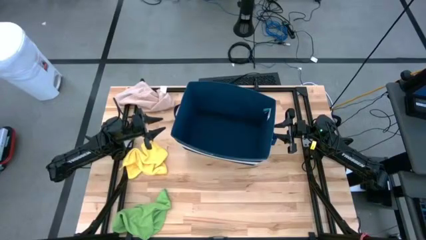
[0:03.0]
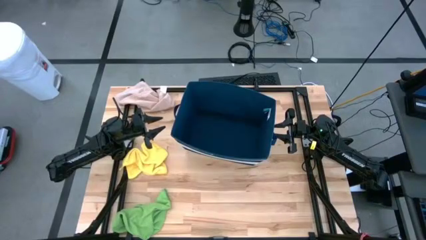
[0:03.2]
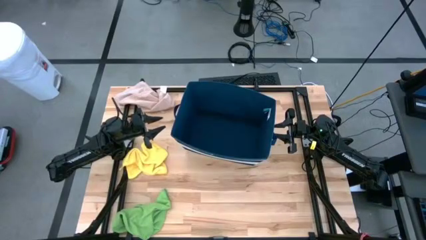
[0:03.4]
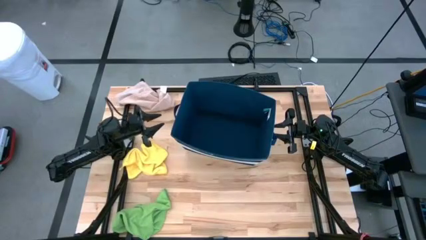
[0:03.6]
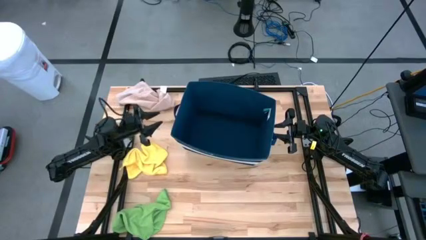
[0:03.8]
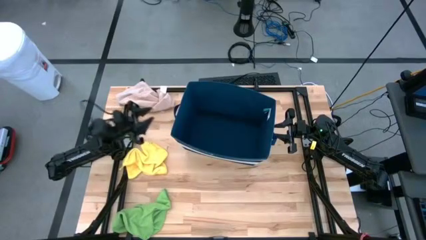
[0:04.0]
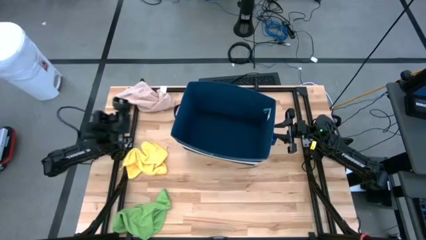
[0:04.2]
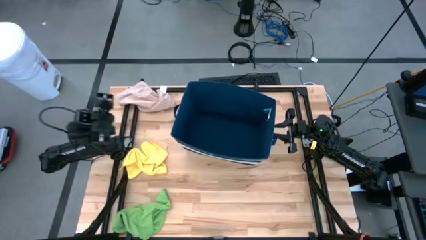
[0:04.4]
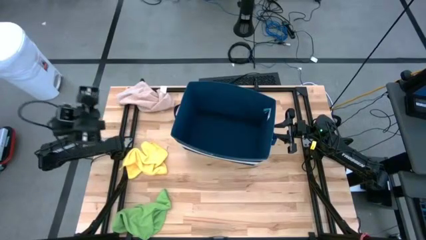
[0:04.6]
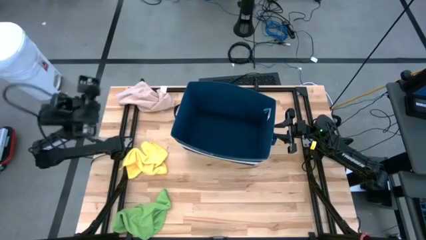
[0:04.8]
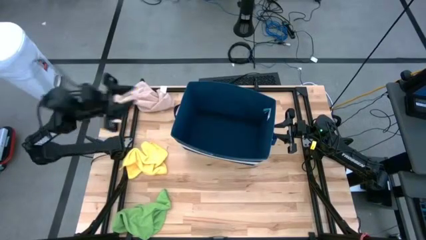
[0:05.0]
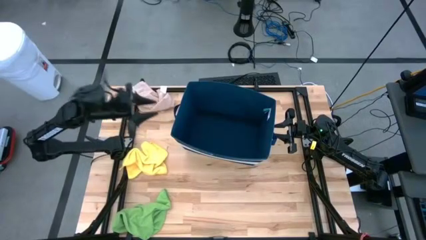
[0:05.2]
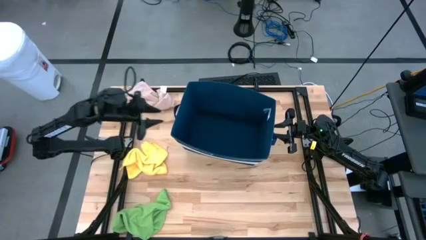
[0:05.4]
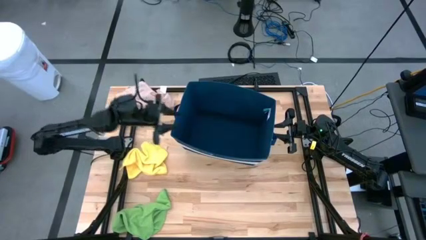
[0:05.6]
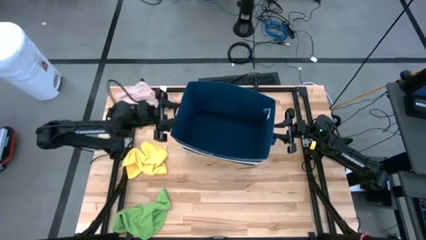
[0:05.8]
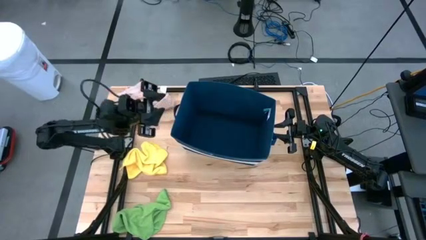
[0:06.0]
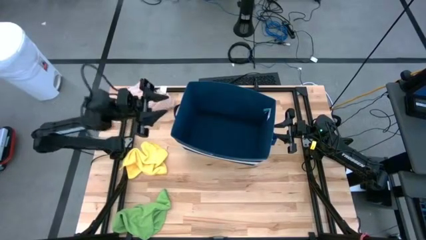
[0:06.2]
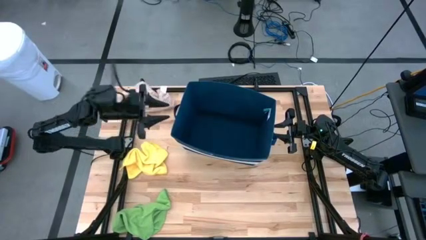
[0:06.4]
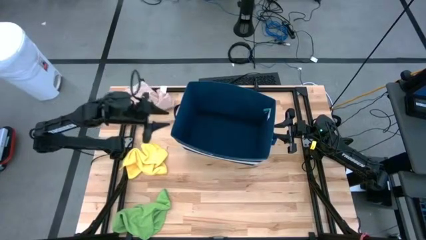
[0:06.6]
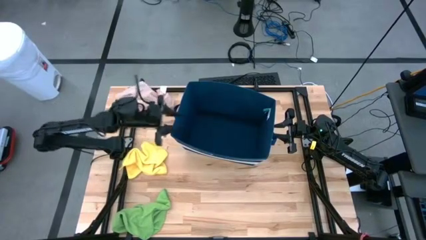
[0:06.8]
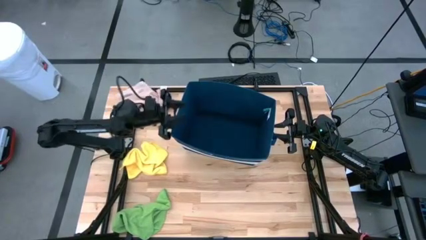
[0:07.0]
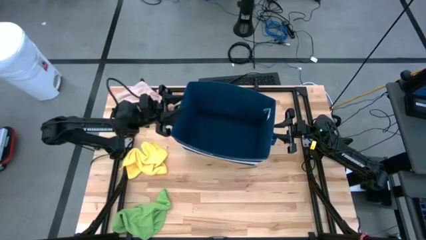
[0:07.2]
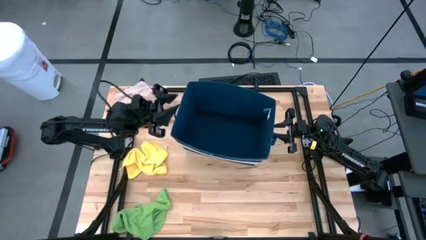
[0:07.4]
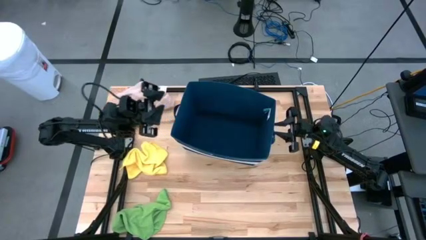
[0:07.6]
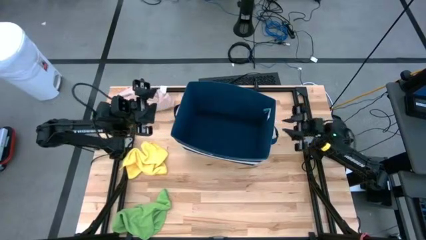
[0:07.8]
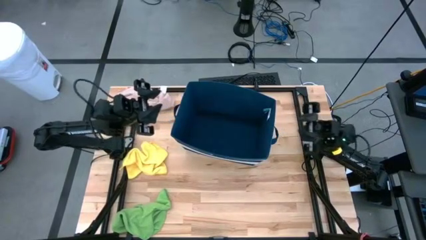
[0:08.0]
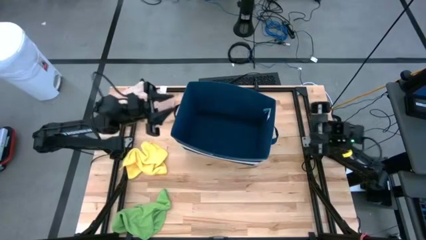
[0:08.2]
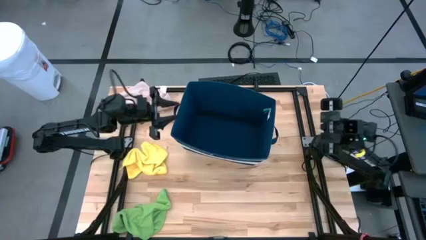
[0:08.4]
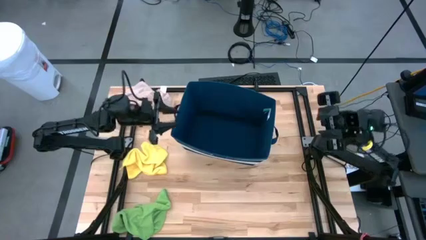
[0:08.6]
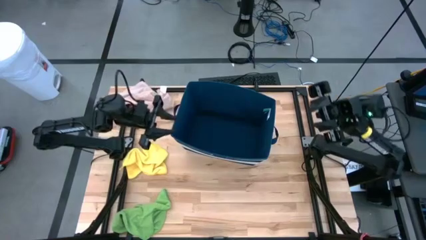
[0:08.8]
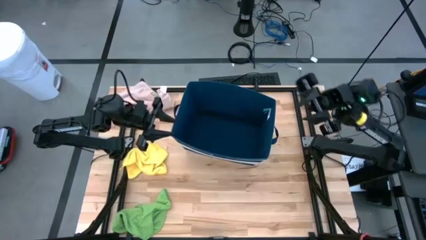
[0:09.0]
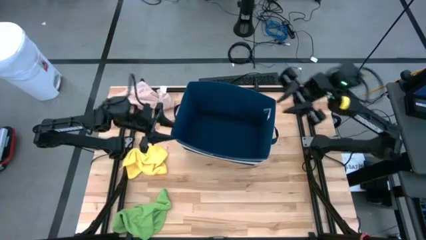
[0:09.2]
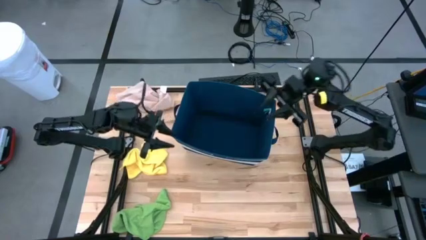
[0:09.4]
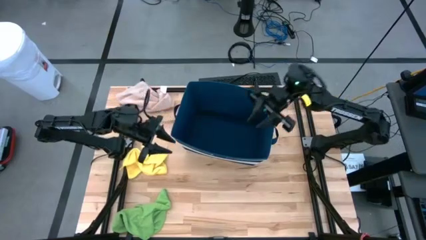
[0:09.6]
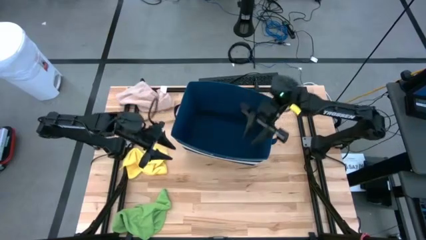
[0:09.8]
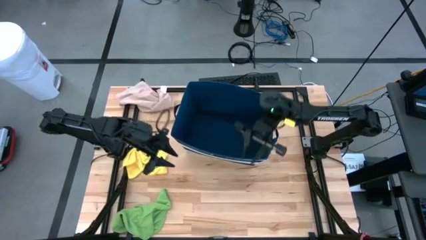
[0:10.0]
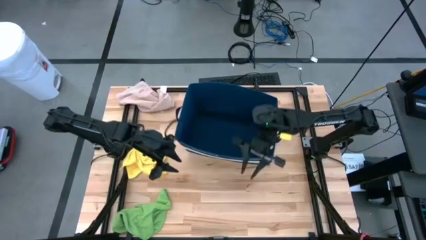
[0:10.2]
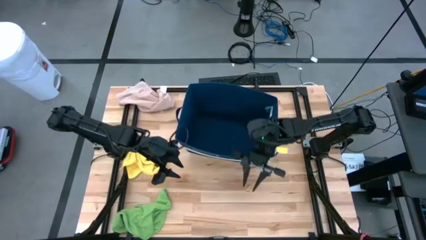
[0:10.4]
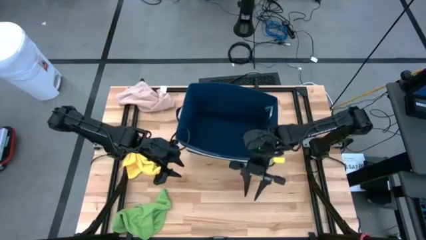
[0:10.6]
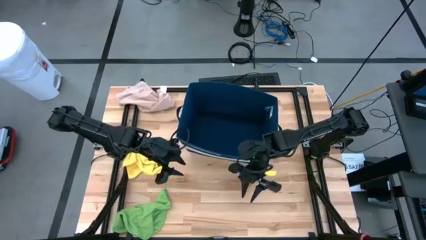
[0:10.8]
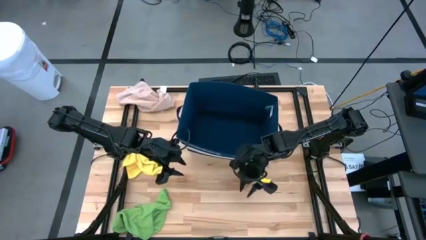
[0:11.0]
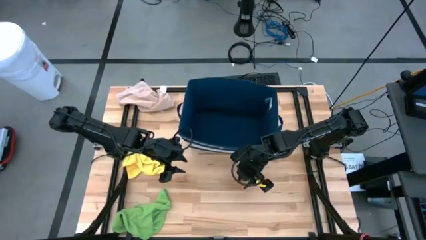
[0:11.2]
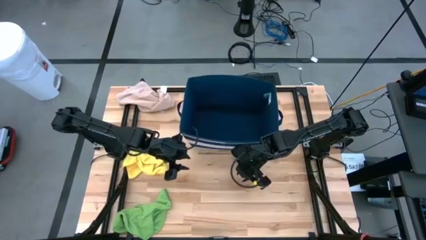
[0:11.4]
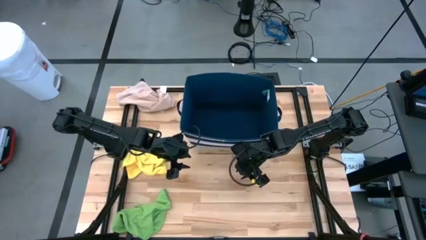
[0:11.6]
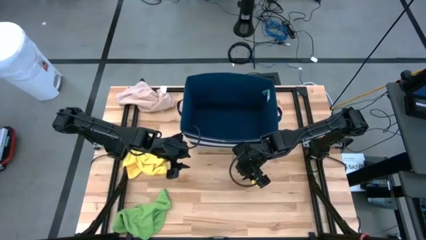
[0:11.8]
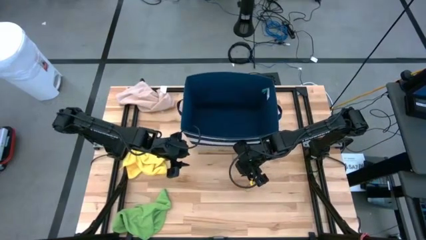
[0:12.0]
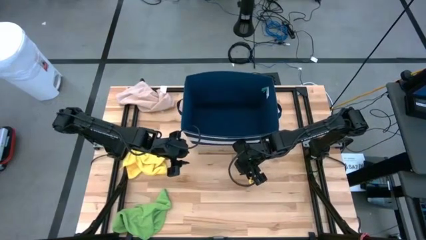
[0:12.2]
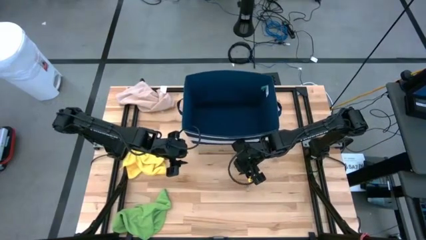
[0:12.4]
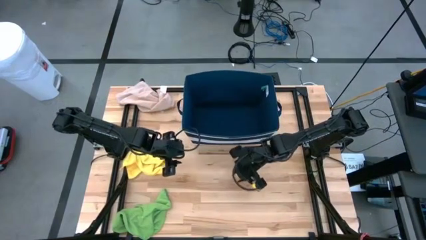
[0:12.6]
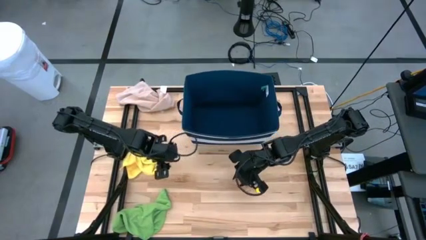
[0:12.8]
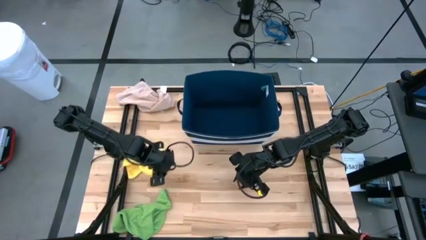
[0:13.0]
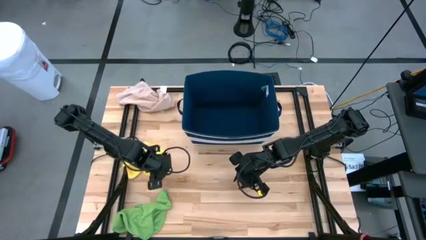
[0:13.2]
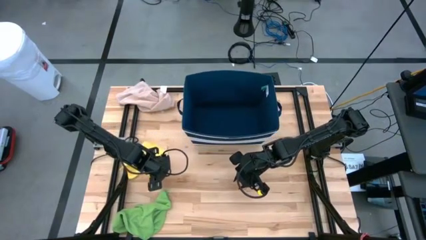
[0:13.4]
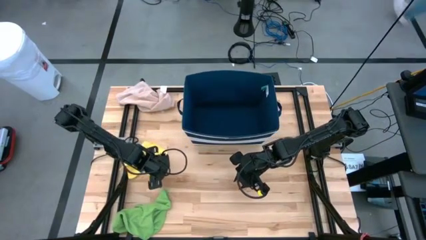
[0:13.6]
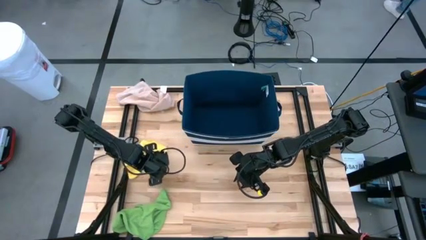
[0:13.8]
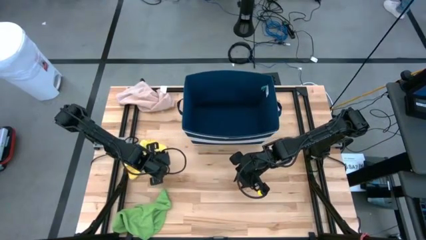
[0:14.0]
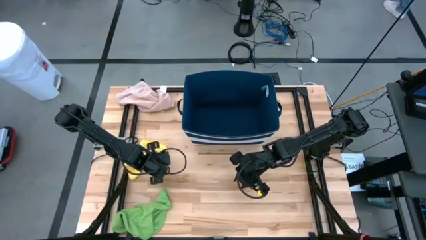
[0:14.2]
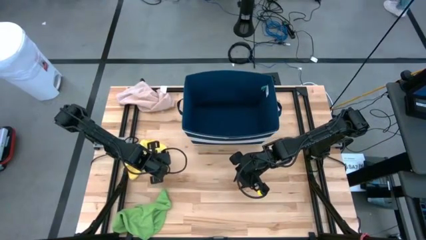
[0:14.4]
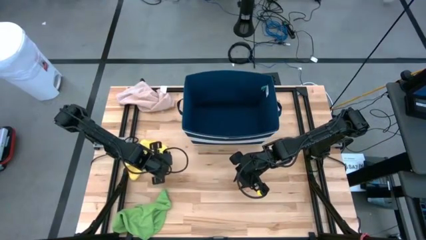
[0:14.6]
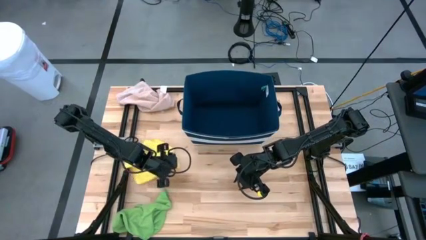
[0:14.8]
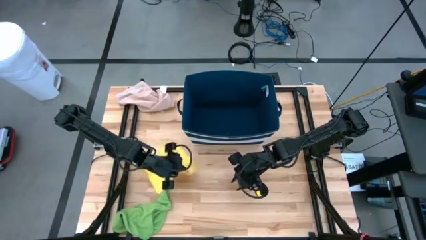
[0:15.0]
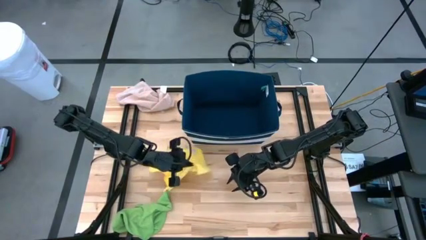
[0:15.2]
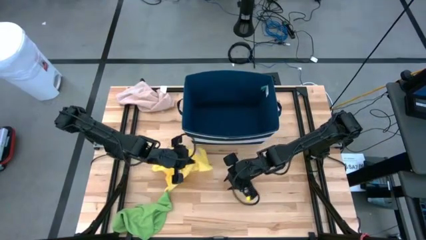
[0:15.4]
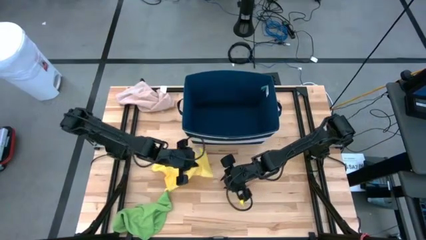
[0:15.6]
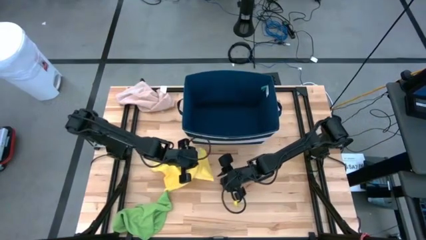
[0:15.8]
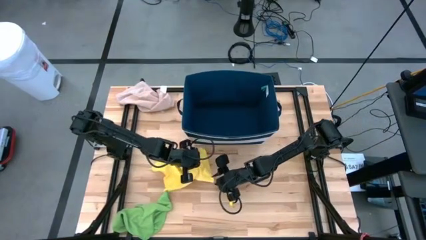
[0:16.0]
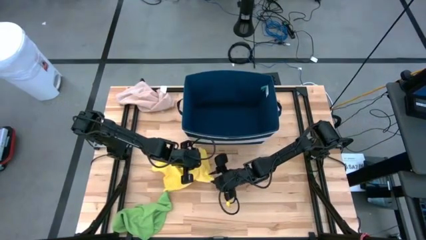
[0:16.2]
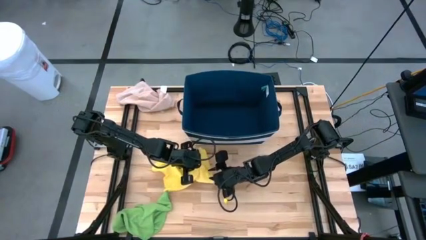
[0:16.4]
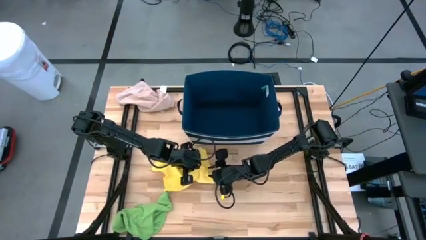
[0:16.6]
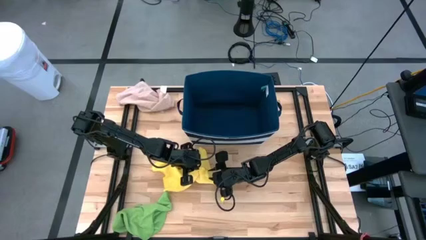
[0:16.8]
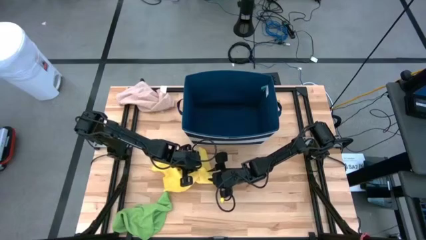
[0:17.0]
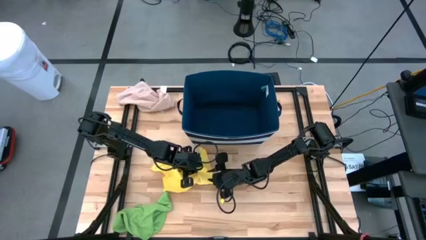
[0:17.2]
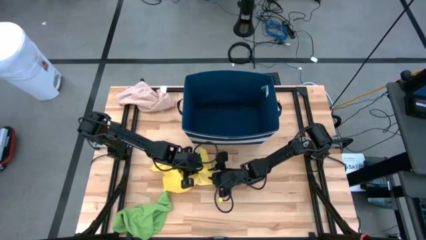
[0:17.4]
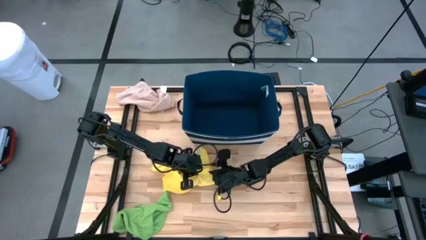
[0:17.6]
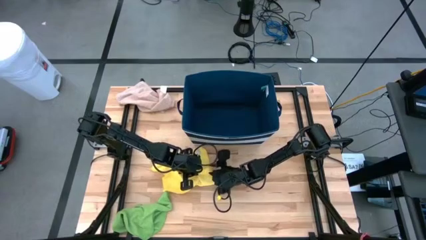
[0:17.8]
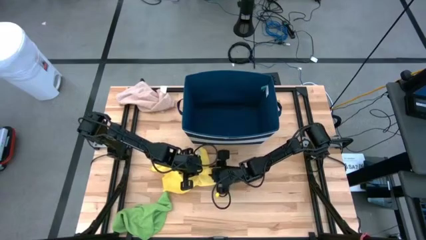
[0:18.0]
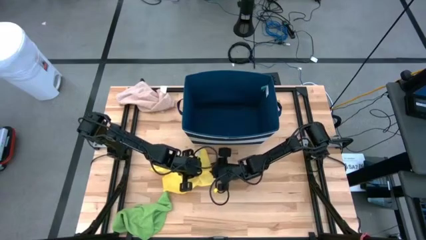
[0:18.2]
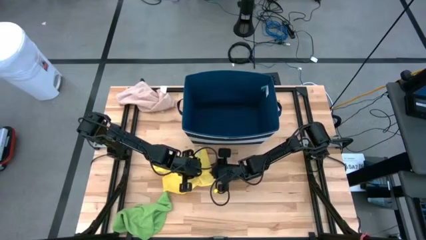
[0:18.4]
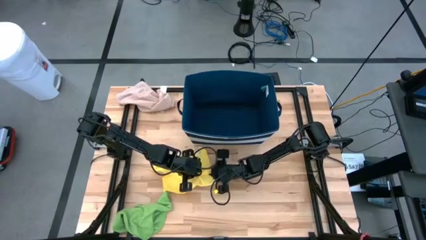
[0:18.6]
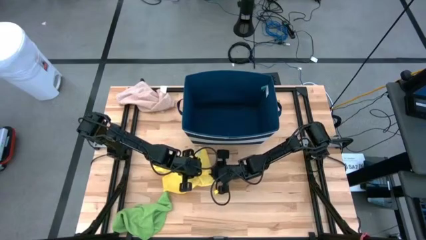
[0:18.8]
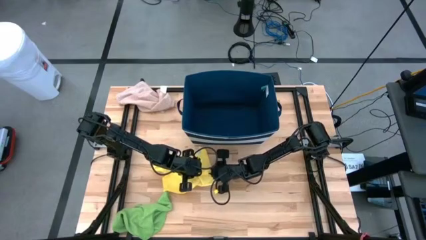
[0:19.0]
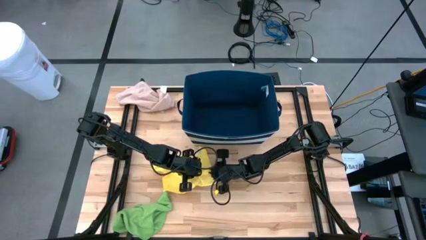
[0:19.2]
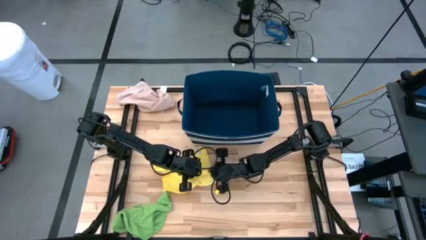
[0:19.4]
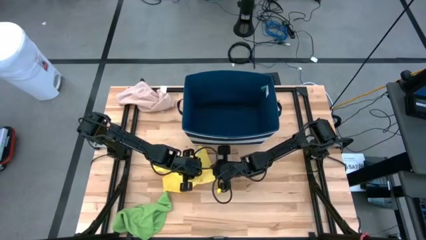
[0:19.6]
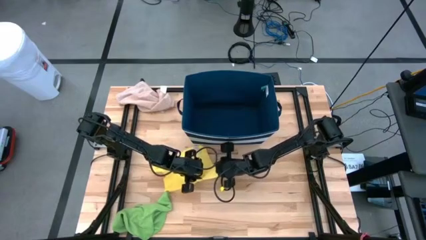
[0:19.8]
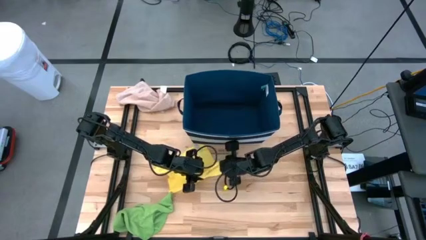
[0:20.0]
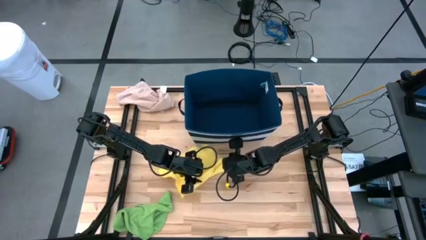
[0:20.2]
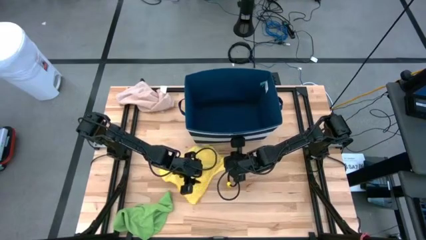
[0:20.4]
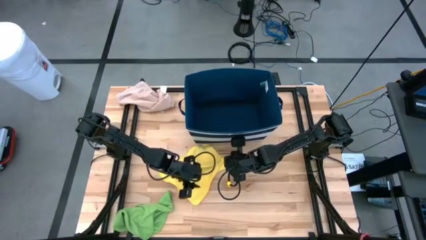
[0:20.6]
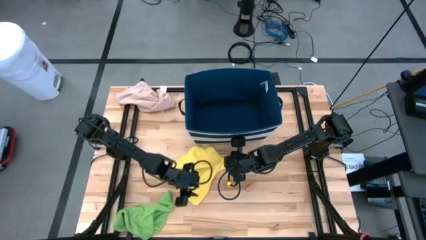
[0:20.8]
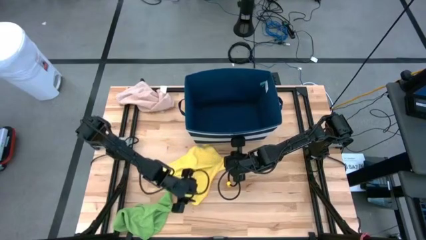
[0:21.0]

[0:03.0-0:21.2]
Task: Fold towel
Fold the yellow towel
